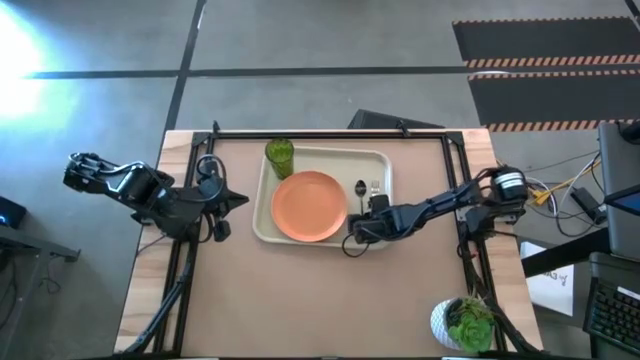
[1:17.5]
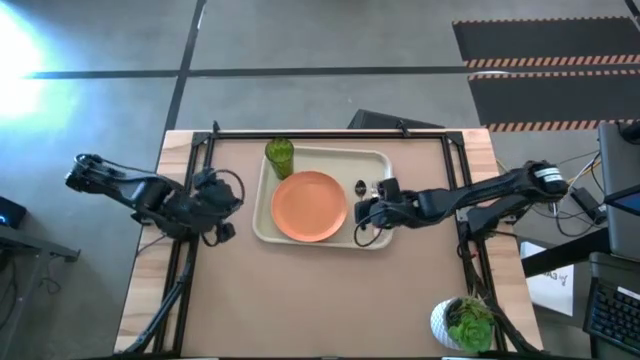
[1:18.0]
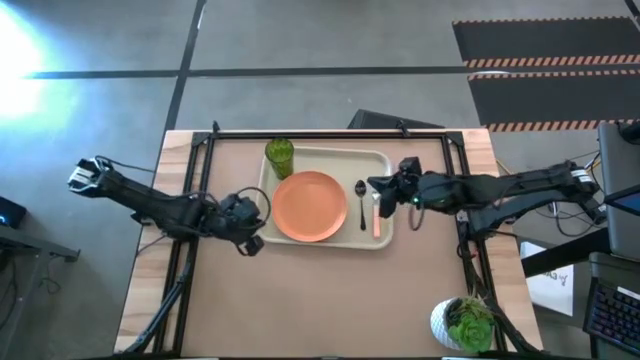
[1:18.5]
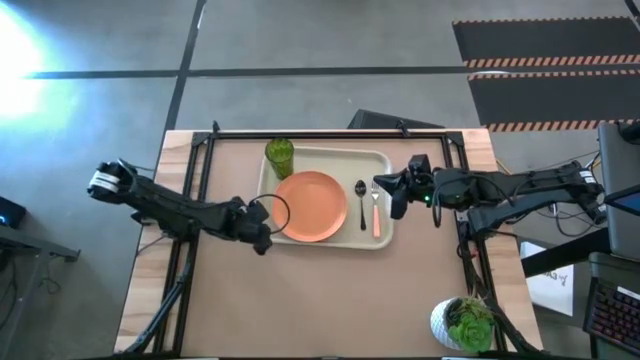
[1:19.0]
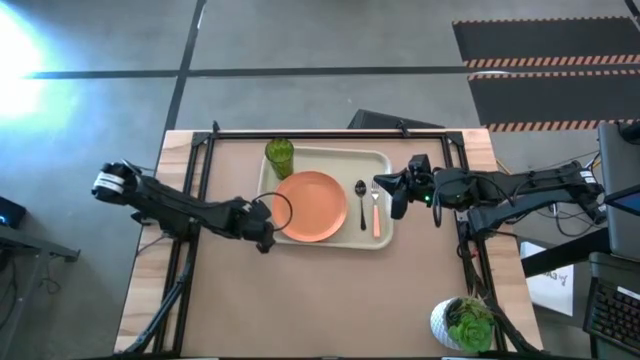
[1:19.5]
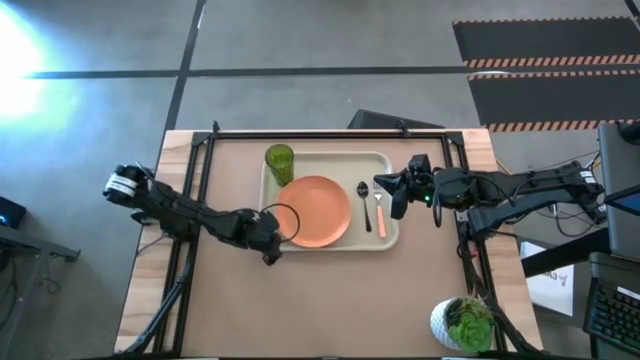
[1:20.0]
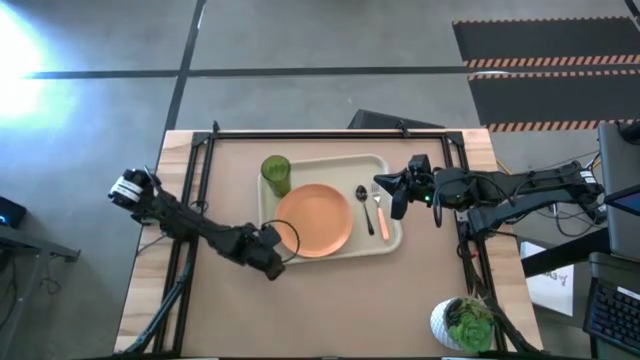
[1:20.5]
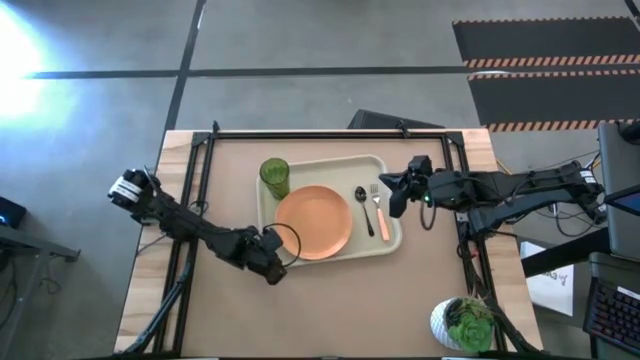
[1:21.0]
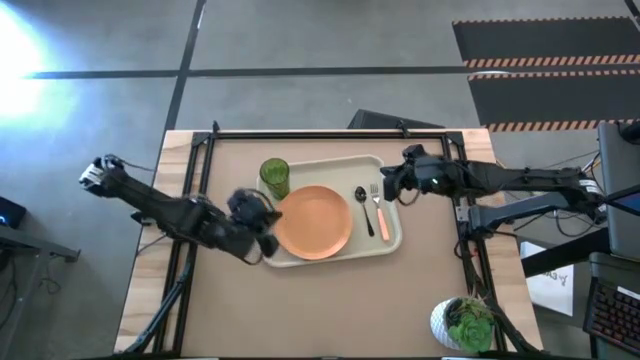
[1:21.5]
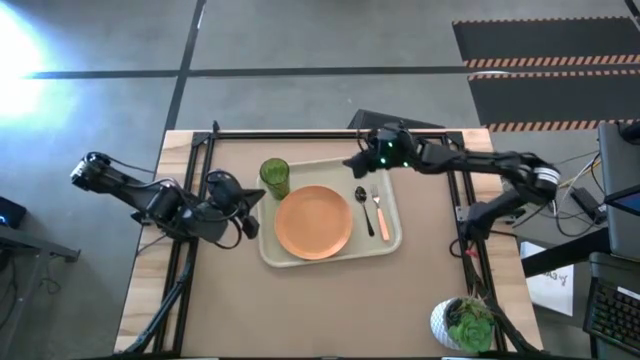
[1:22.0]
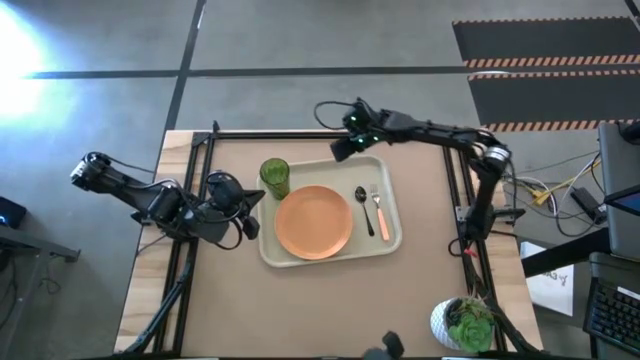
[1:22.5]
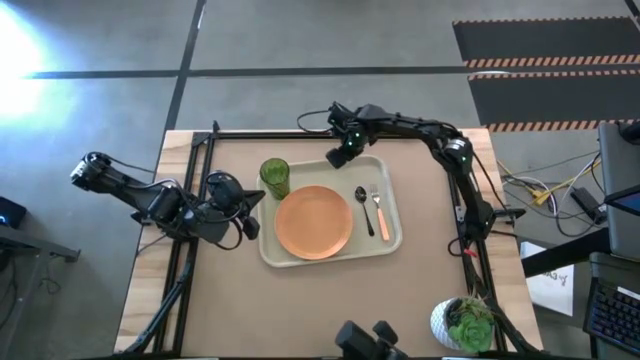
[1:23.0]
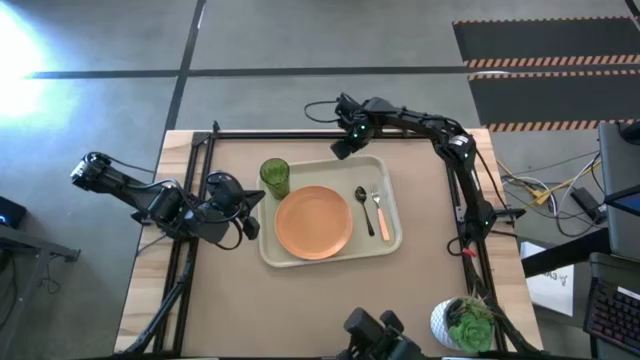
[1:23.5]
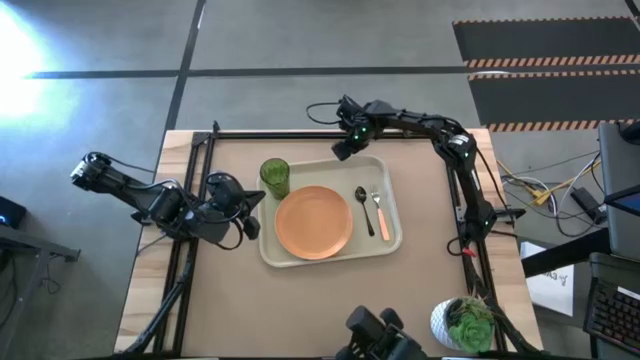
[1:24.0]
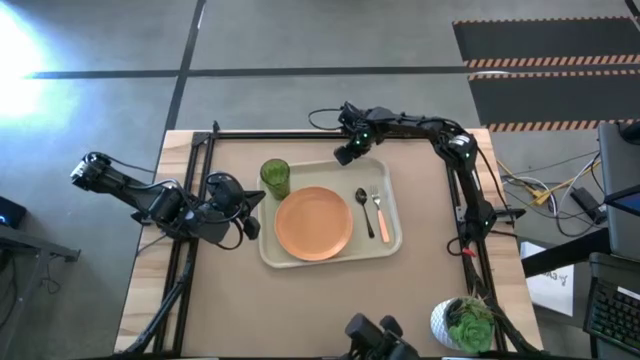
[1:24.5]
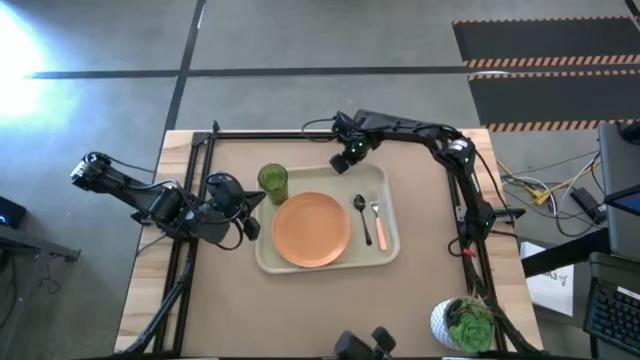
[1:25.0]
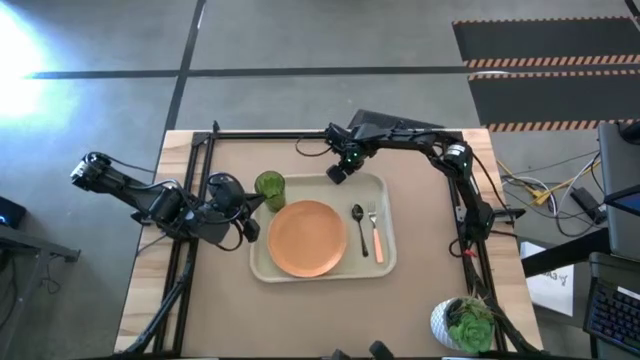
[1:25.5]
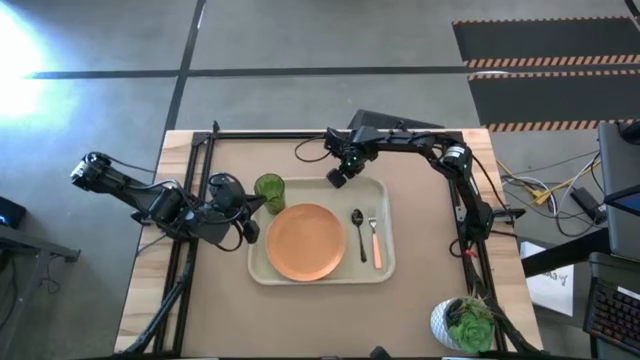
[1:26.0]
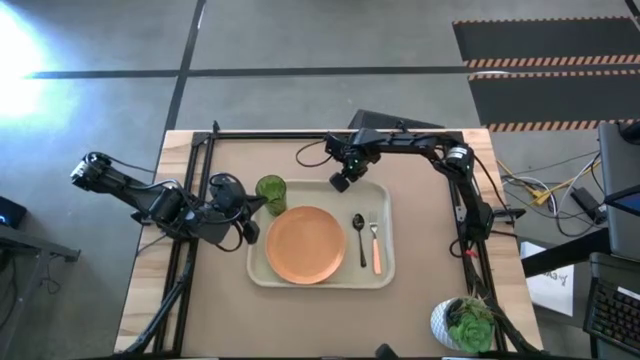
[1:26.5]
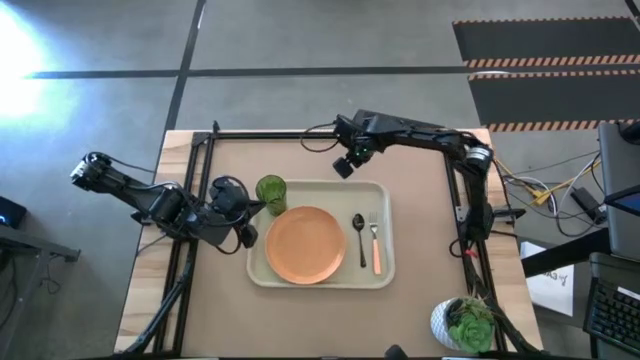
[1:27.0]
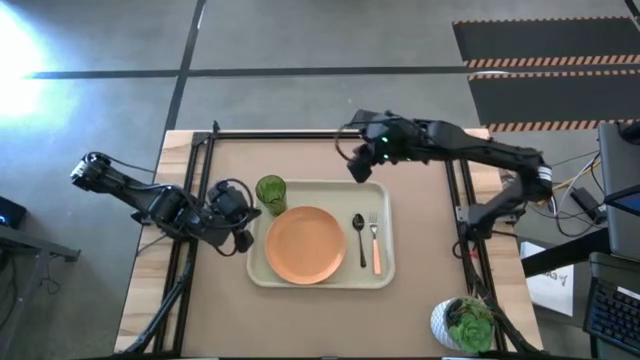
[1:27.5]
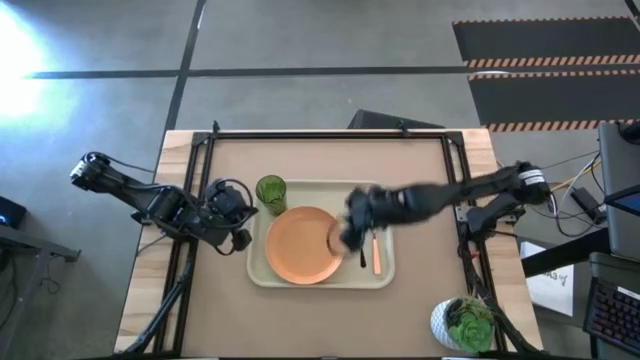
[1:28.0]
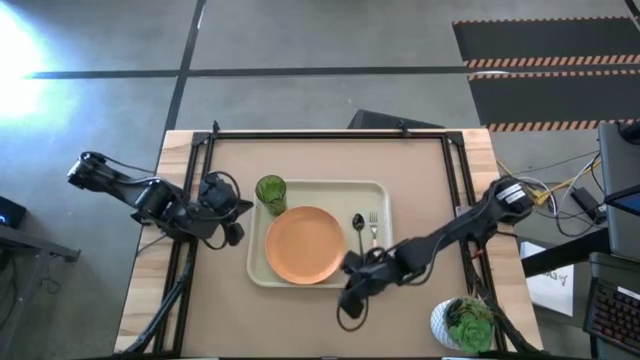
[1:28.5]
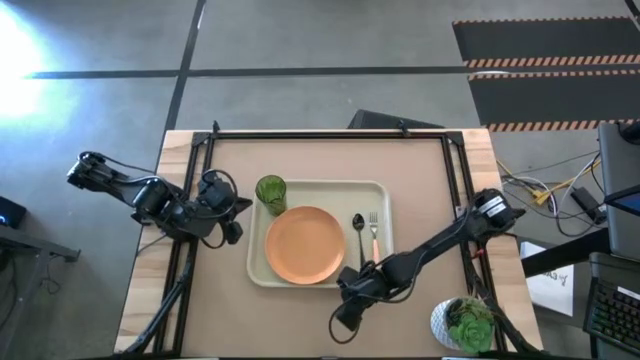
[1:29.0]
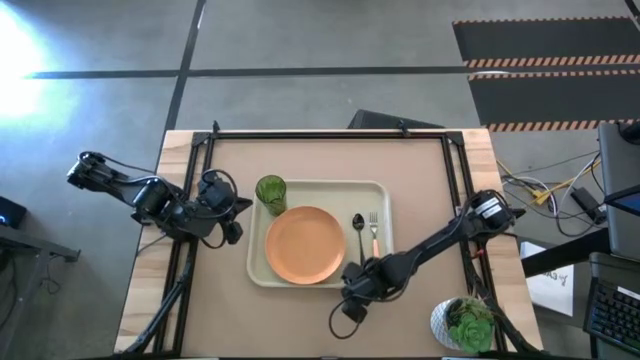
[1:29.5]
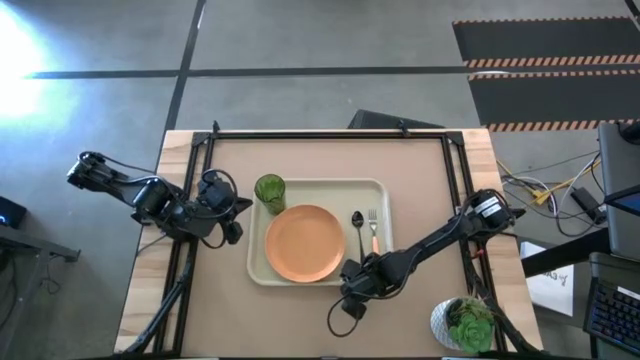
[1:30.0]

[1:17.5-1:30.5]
Task: Pick and place plate/cup/fork/spoon on tray
Move the light brown serving tray to the middle of the table

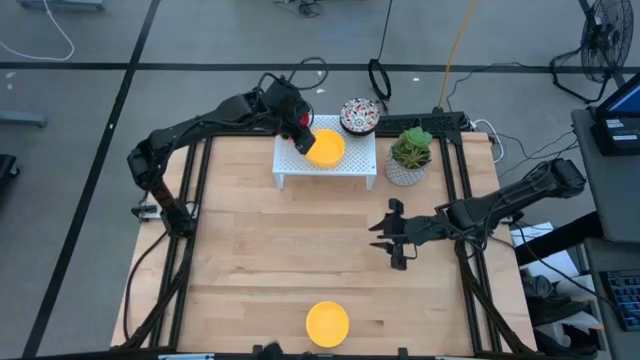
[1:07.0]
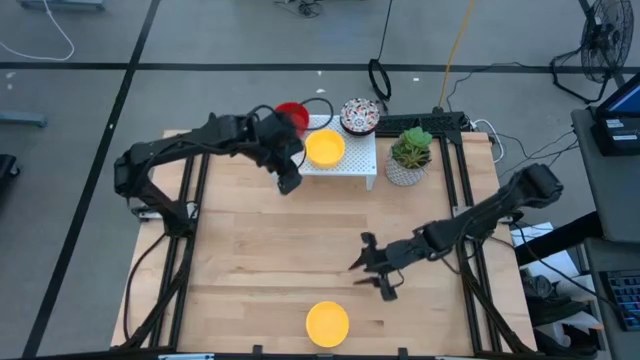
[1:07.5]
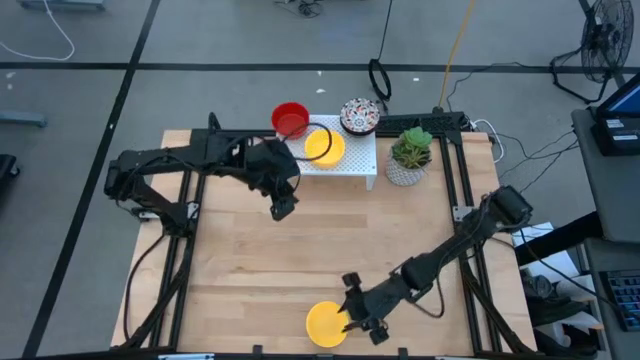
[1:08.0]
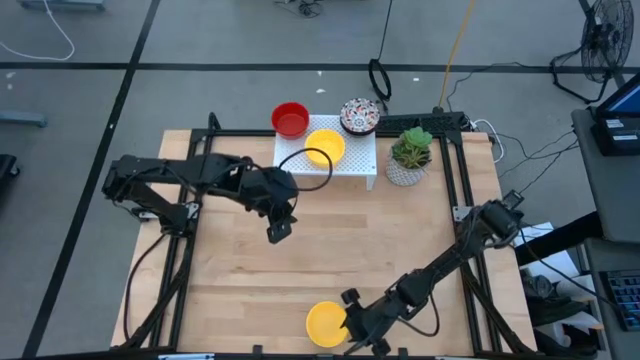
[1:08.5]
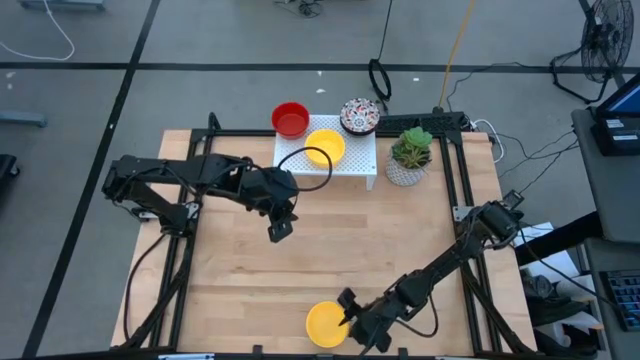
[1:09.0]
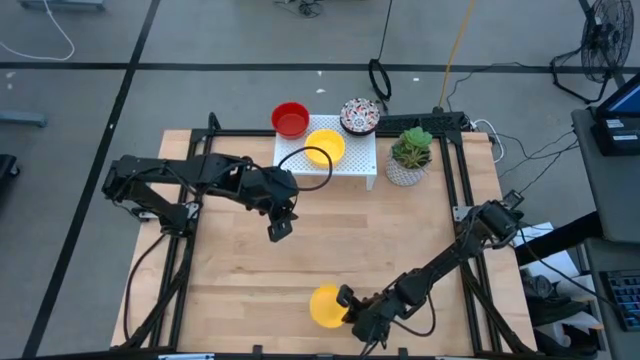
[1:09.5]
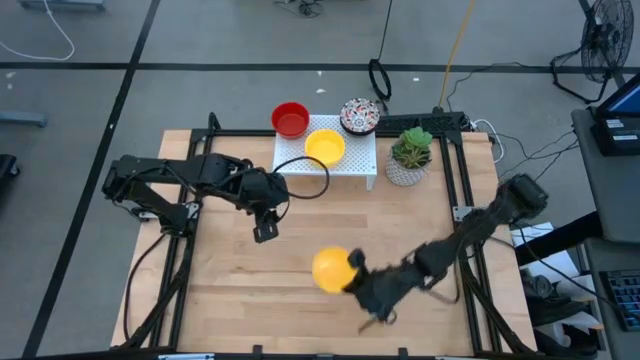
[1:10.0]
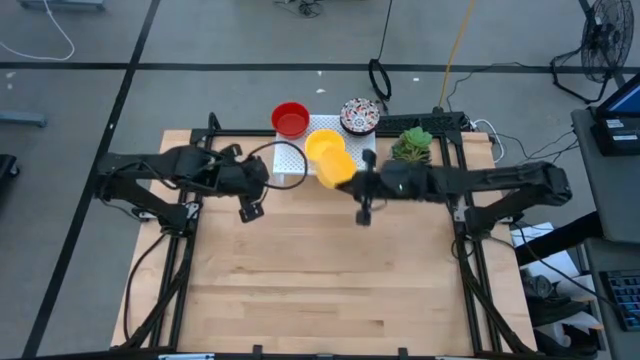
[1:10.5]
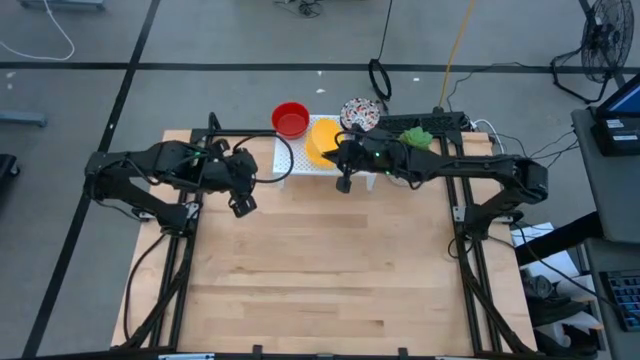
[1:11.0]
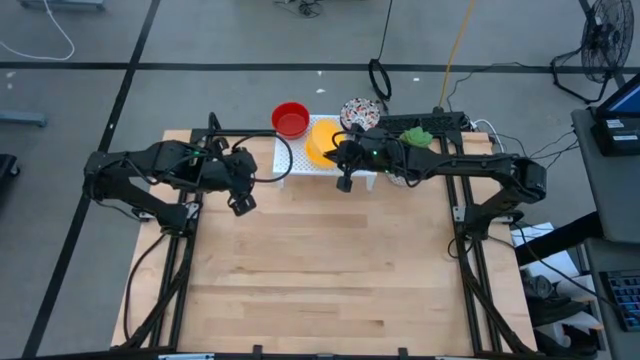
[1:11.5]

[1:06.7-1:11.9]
Task: Pick & Place Mini bowls
Stack the yellow bowl on the yellow bowl on the shelf

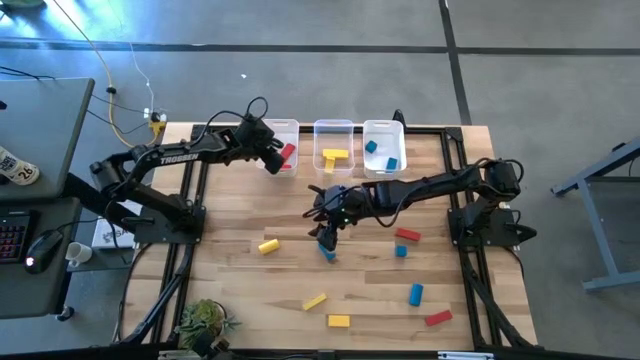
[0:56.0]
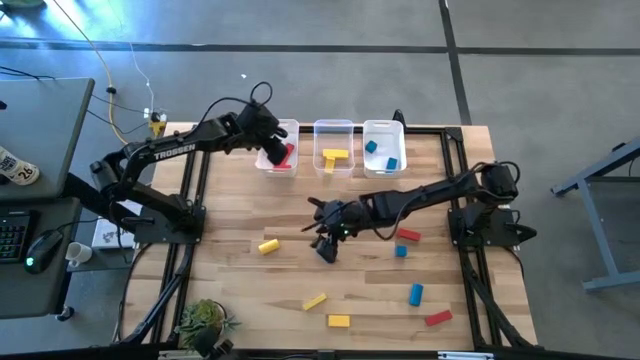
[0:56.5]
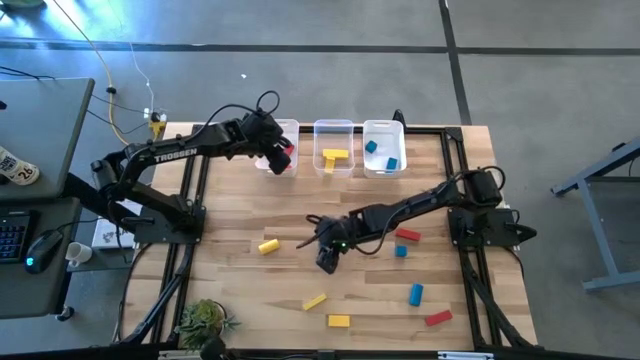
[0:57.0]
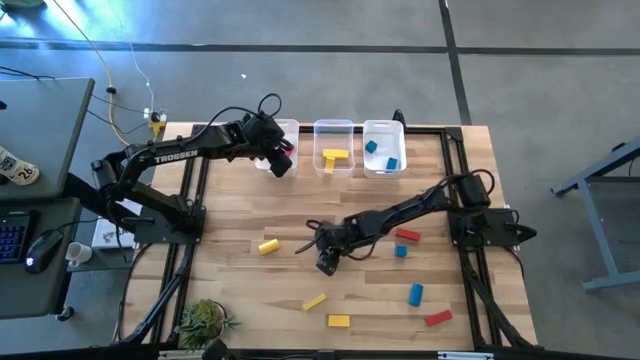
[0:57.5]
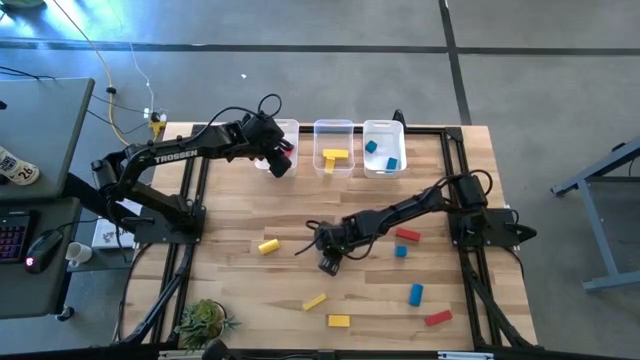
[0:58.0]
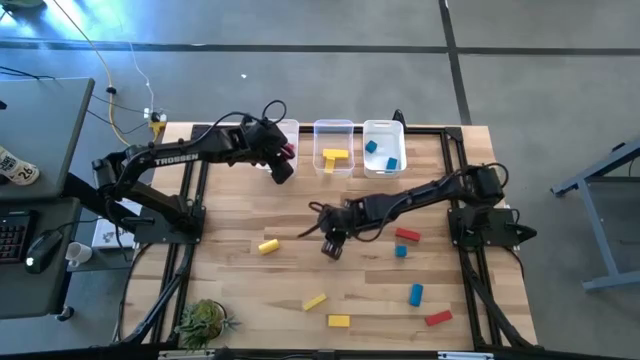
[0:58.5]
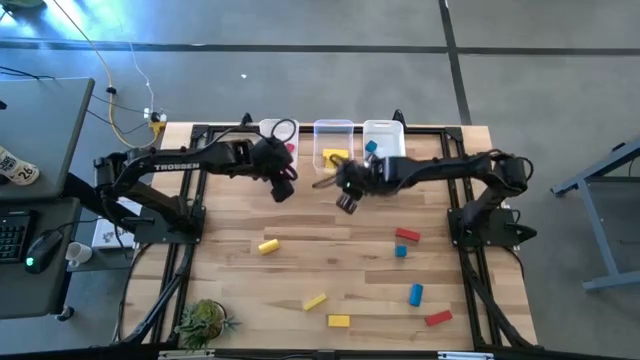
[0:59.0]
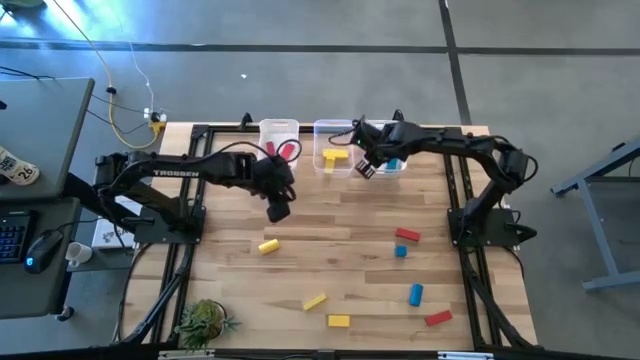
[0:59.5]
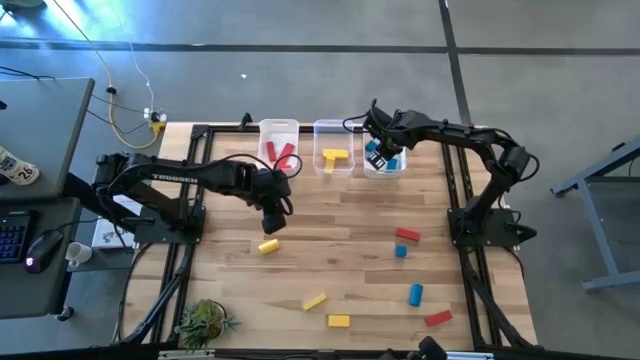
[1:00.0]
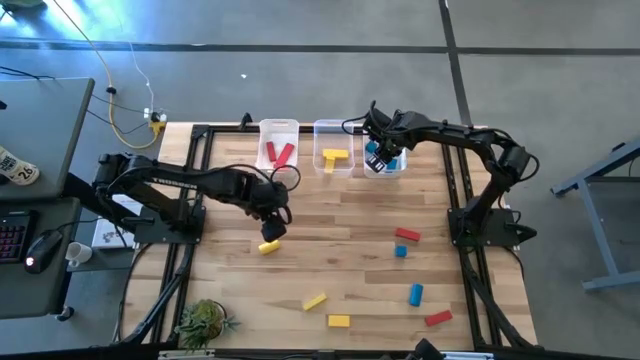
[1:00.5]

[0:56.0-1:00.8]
Task: Sort & place blocks by color
Put the blue arch block into the right white bin
